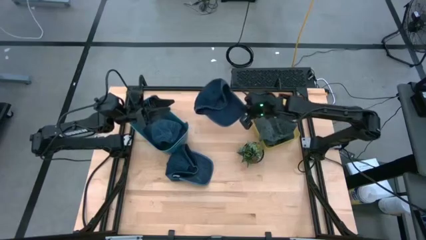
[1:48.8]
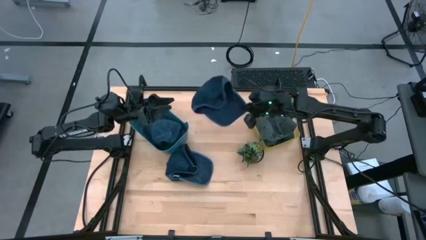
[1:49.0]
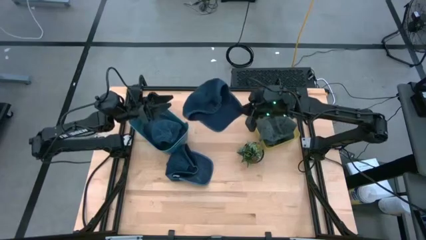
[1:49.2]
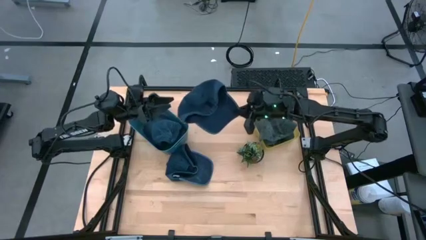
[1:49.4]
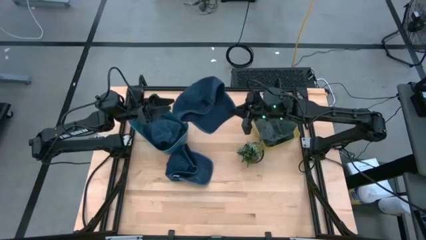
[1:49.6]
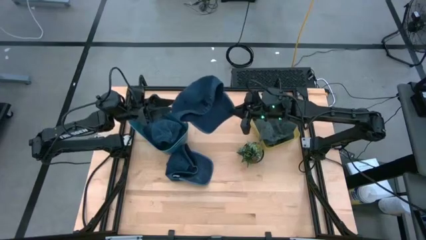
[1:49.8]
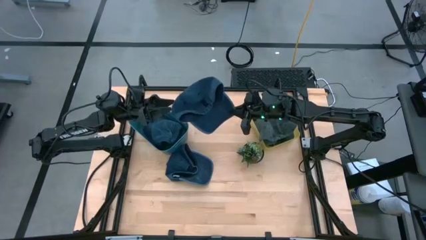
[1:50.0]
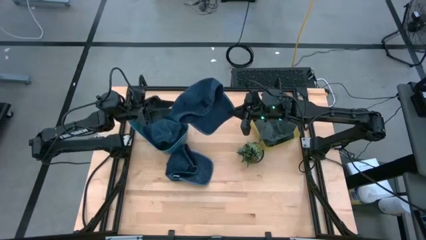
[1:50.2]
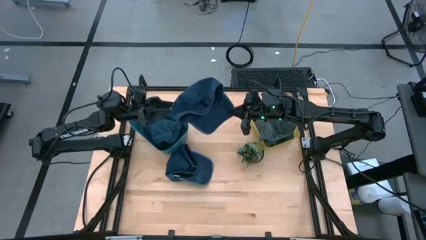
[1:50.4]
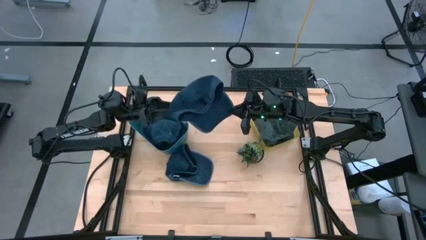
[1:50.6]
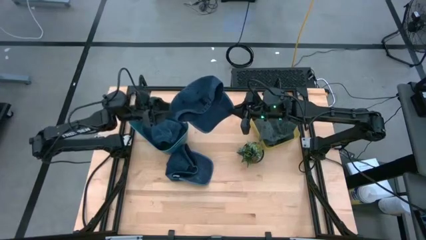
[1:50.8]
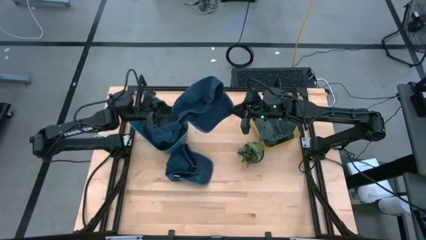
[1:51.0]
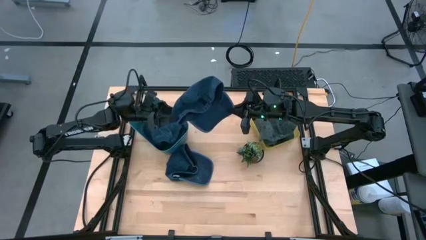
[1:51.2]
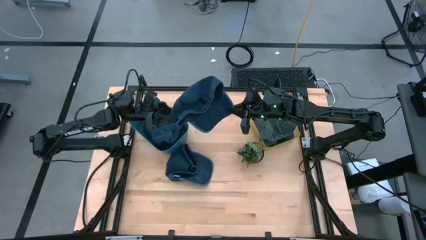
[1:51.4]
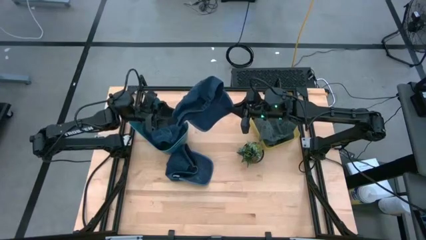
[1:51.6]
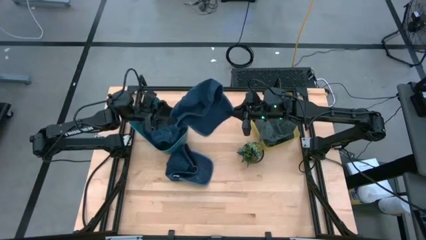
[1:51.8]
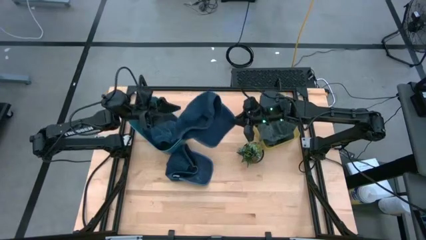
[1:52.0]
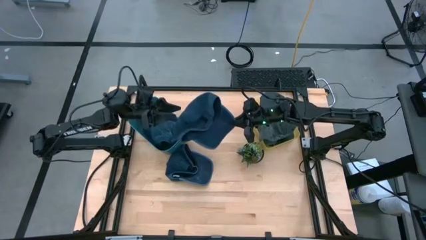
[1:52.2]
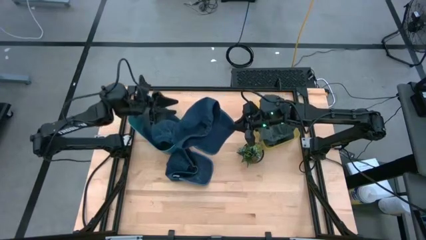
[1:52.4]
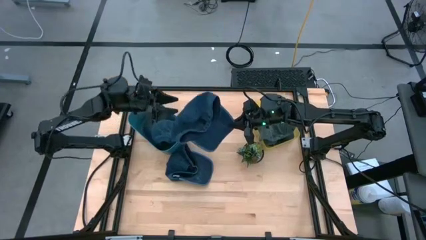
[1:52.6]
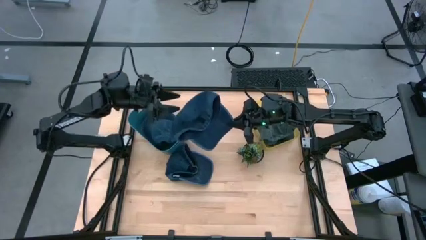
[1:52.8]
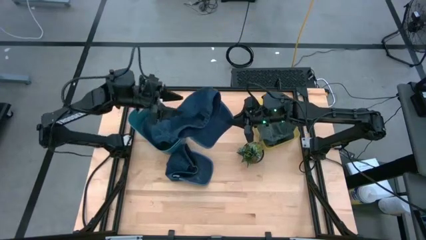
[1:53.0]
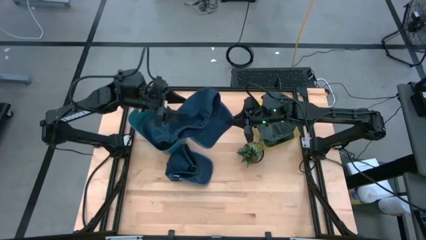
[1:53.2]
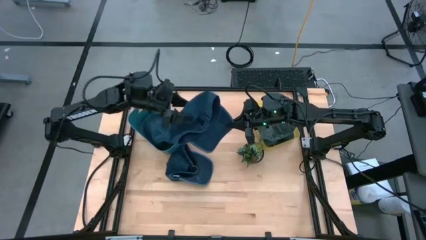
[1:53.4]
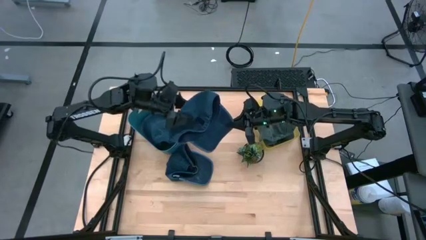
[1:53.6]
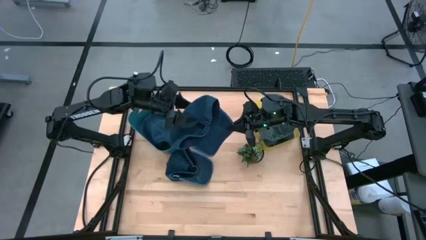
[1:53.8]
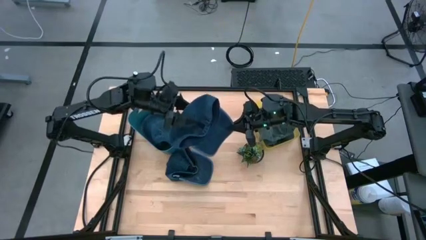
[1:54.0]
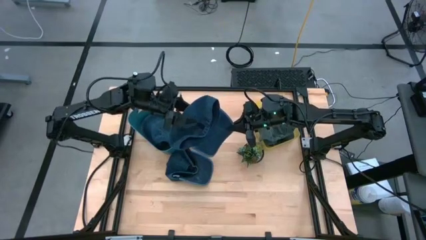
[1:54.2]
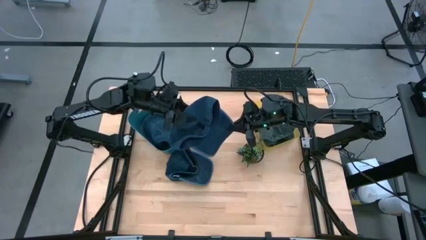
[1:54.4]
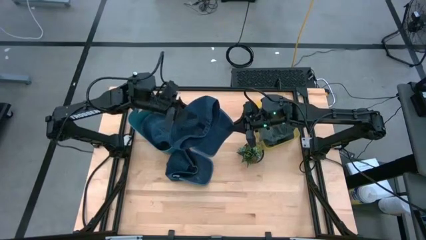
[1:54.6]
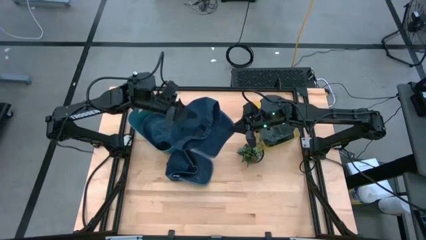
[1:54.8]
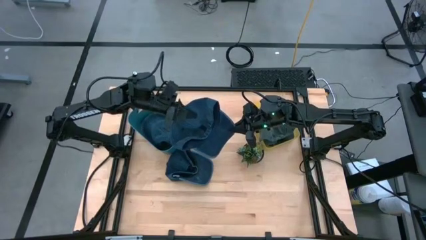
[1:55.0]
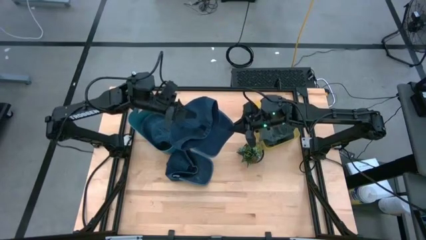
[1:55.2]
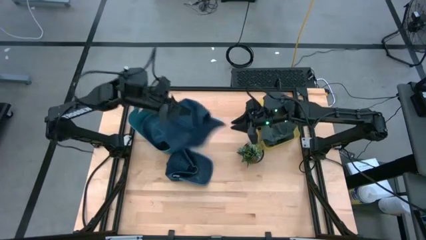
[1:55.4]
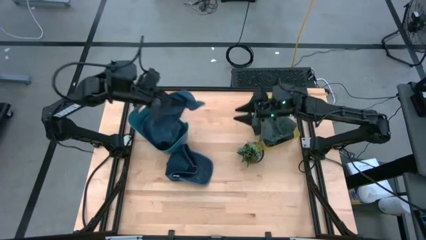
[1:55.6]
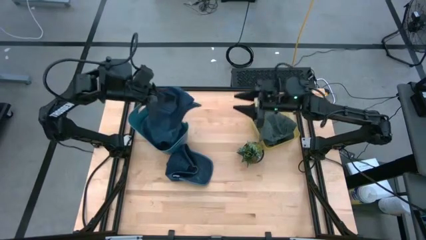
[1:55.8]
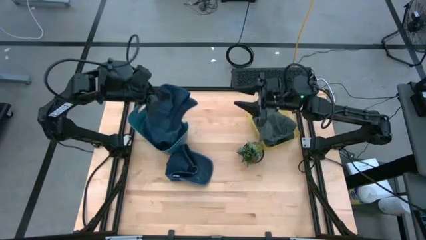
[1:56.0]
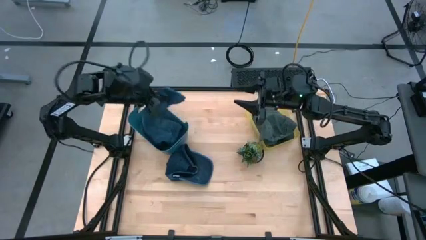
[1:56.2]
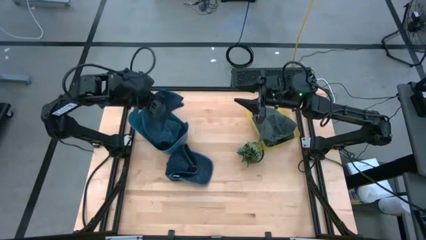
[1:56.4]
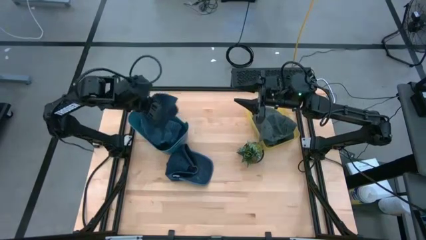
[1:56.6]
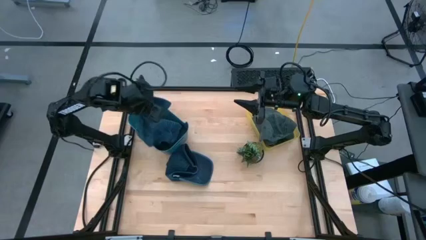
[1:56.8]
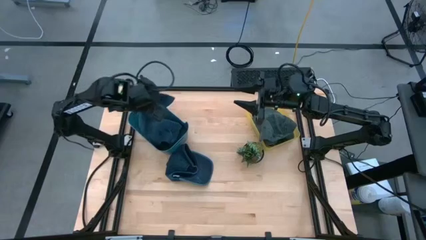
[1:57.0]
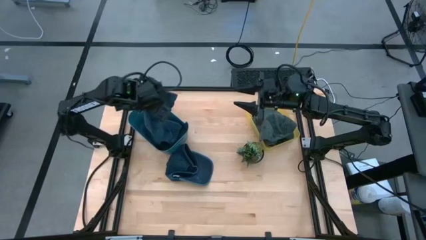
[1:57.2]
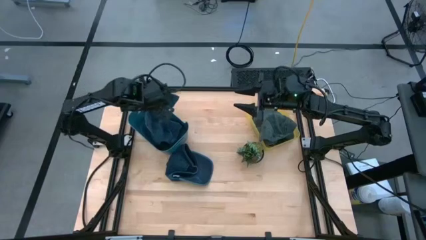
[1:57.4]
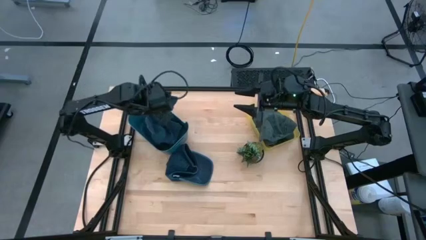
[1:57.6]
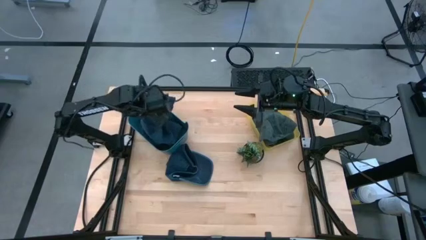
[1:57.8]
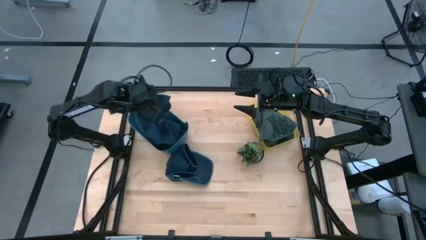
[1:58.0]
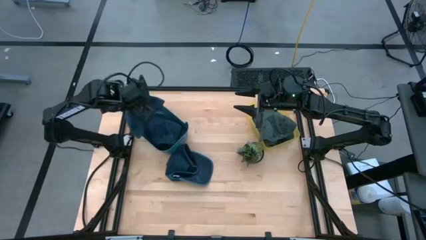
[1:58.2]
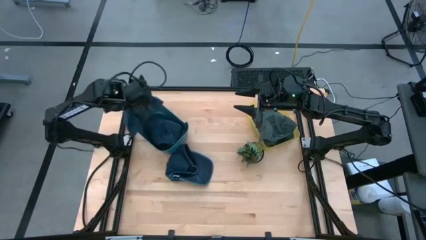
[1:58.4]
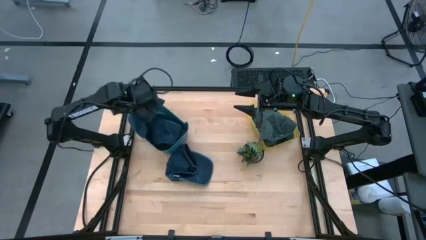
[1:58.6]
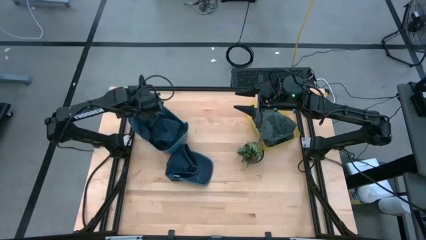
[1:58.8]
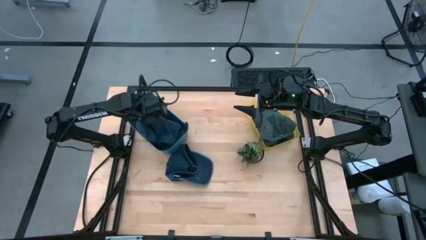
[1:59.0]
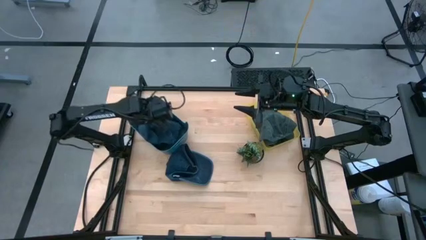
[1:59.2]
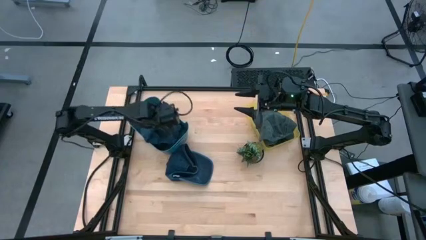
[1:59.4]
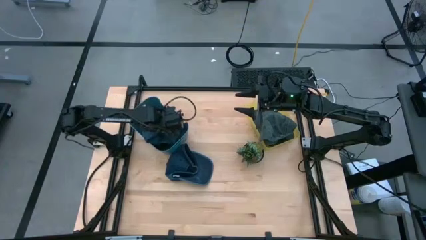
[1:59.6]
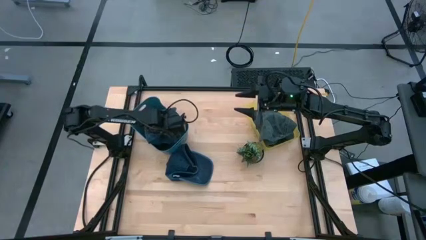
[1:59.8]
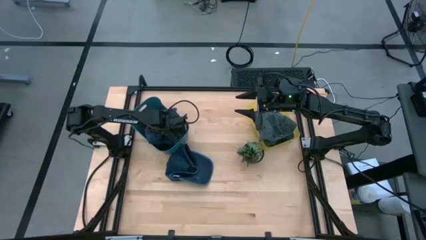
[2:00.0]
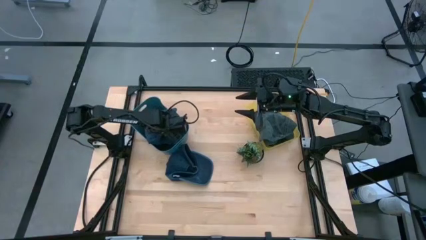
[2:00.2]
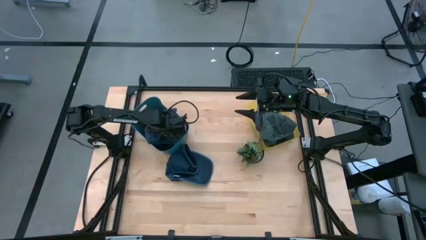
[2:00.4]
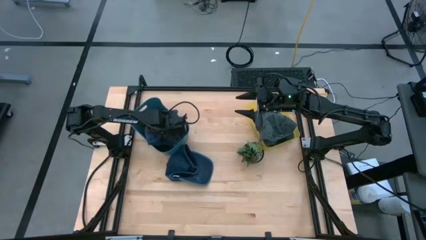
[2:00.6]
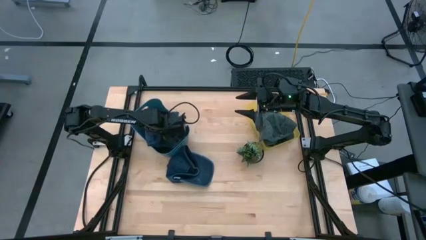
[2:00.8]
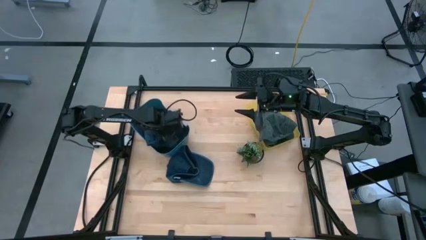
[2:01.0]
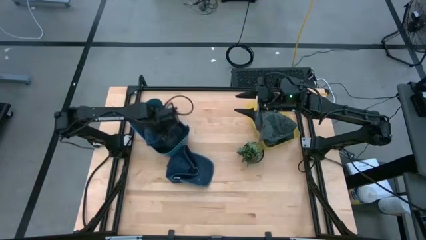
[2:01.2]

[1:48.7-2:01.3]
Task: Pick & Place hat
Put the top blue cap into the blue bin
